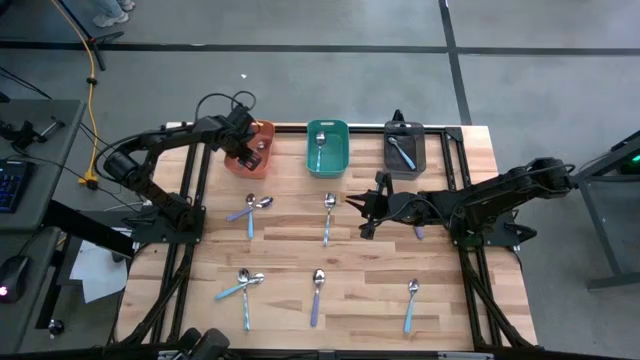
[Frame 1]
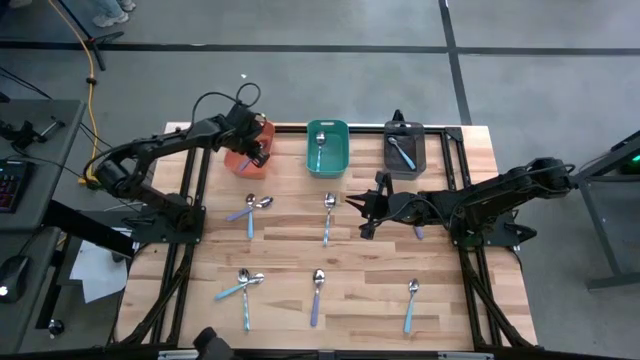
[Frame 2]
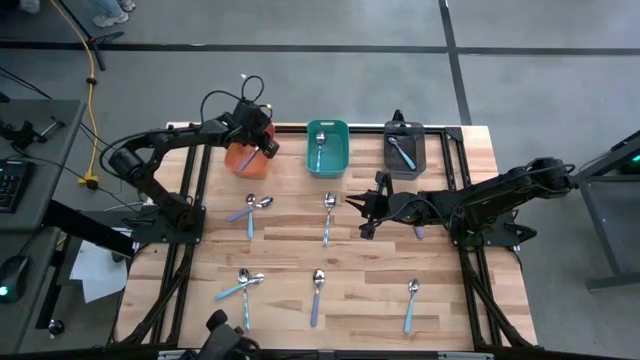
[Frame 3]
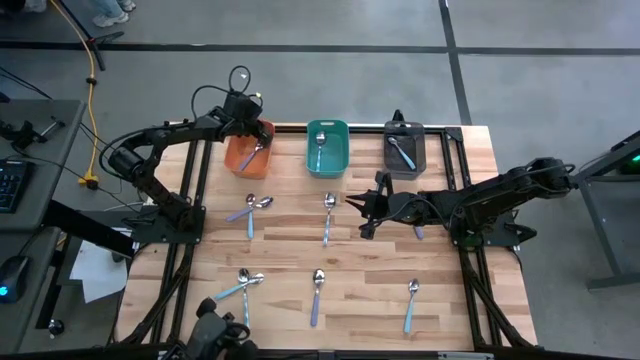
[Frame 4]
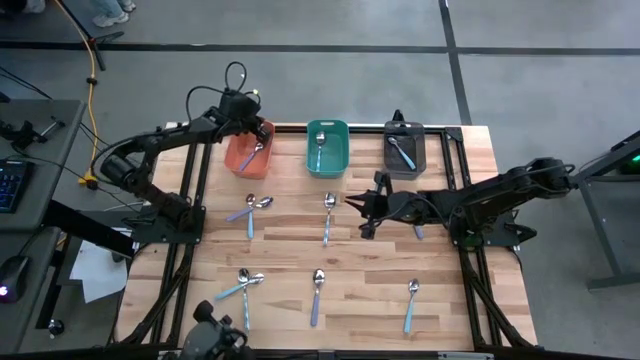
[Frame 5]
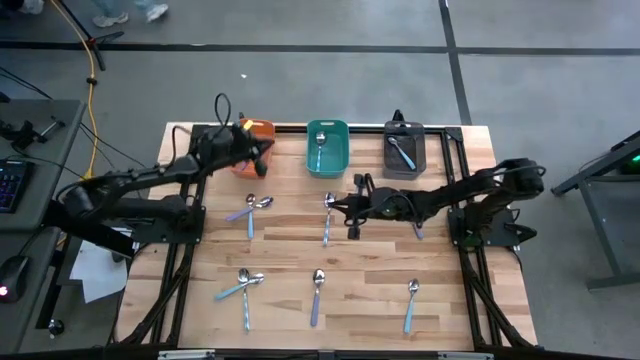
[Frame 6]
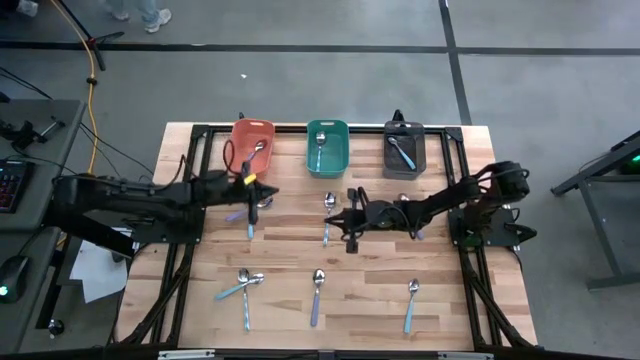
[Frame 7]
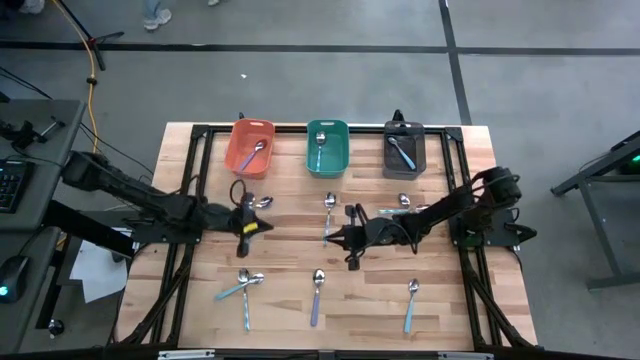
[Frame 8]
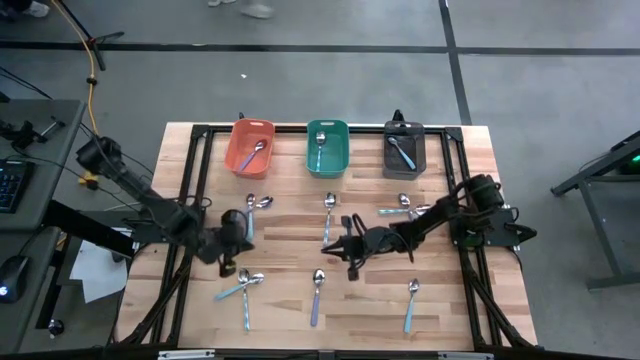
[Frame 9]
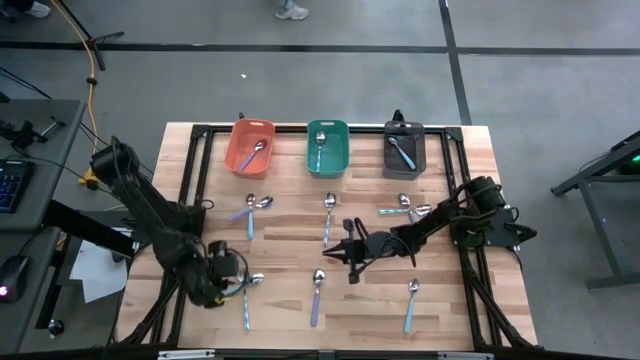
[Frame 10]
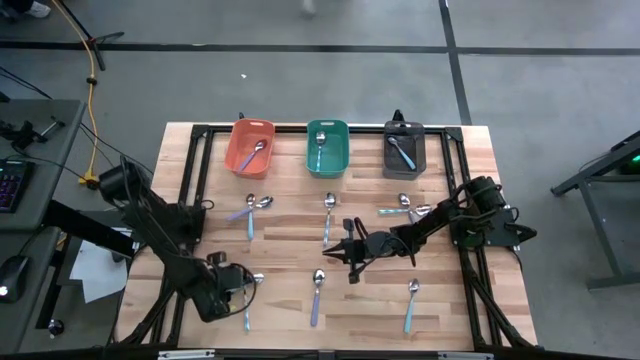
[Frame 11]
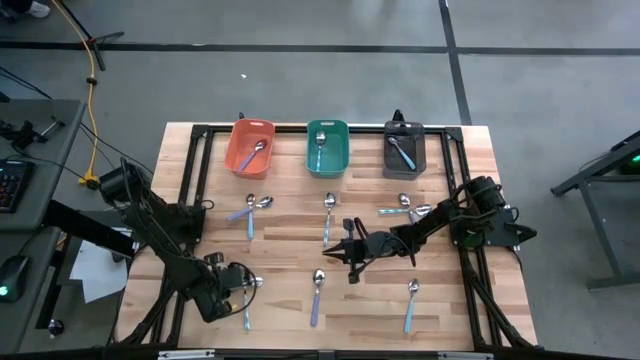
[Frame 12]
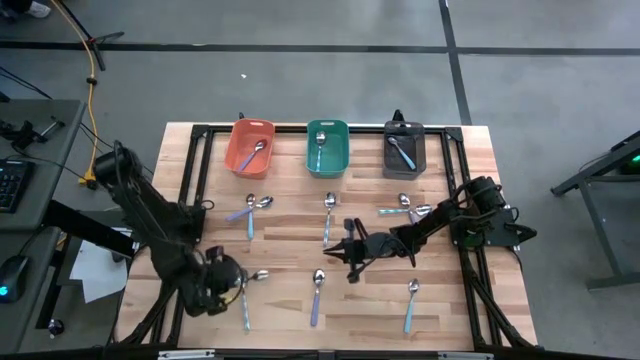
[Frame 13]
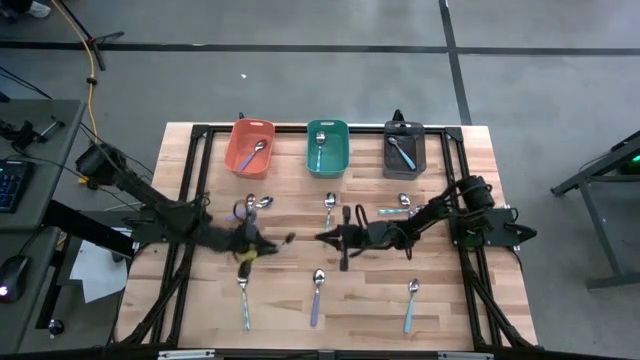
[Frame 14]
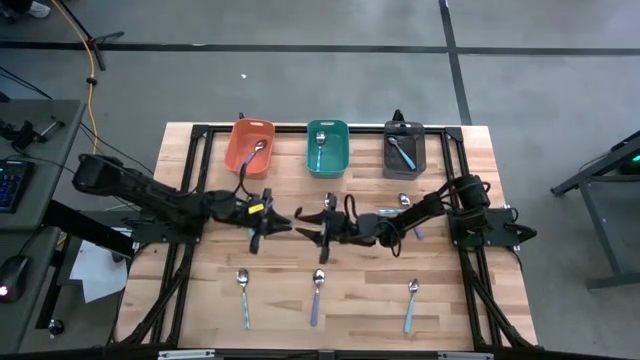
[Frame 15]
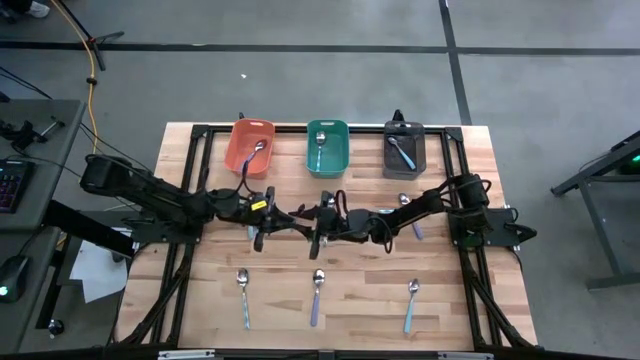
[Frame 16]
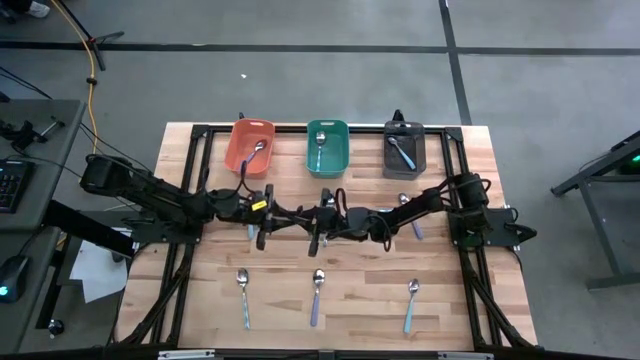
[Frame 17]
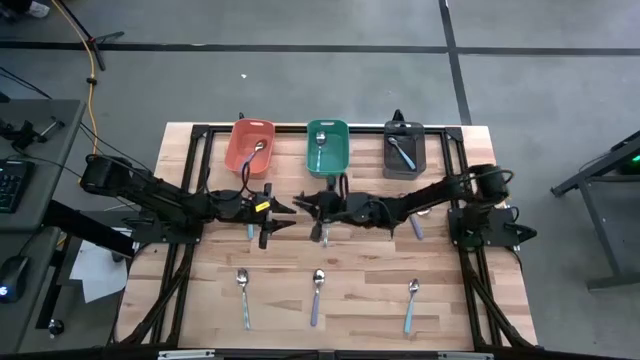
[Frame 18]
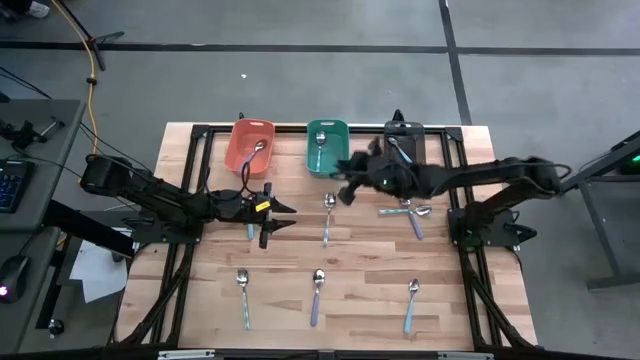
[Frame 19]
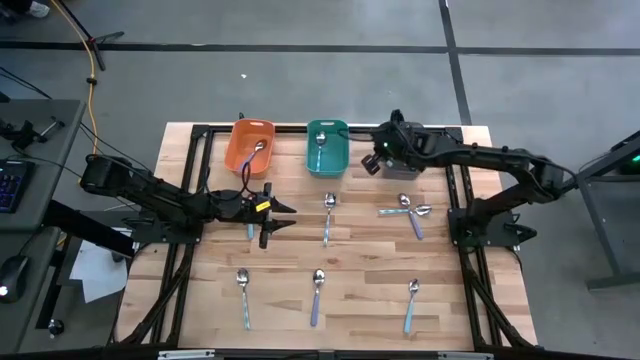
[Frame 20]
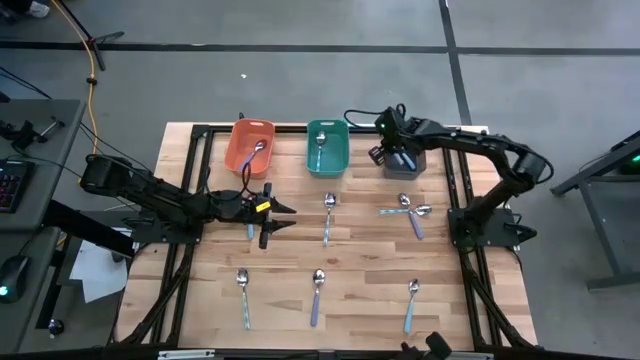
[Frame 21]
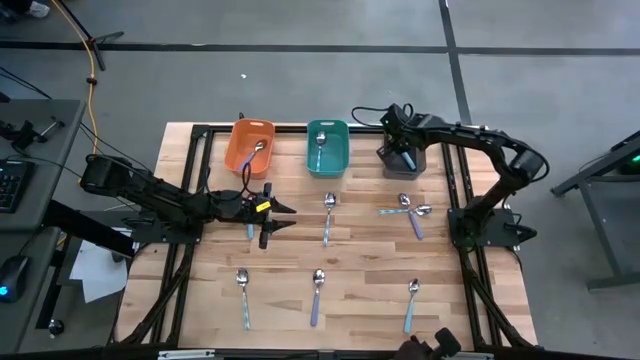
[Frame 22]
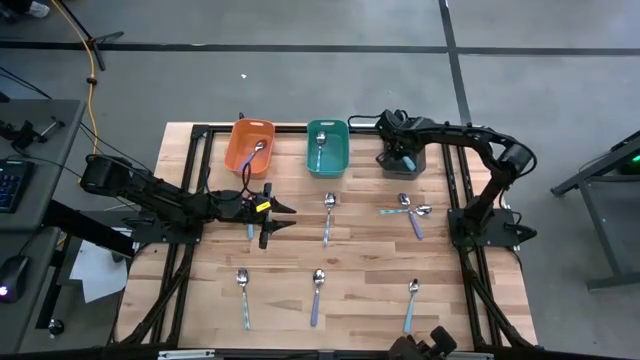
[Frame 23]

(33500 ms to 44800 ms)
Task: Sort silverware by color (type)
Put the blue spoon into the black bin

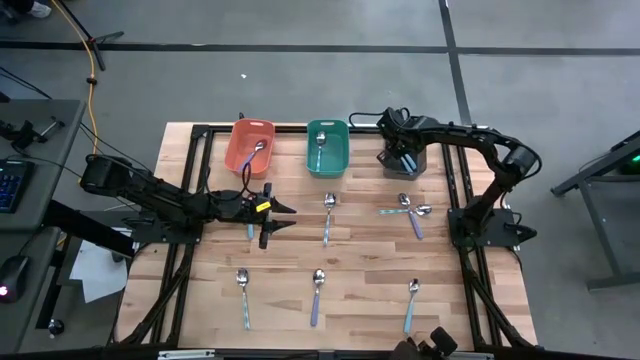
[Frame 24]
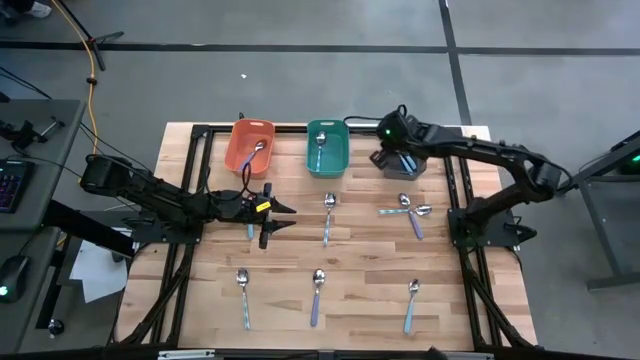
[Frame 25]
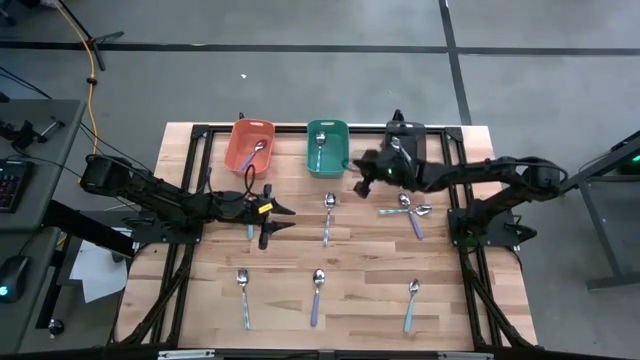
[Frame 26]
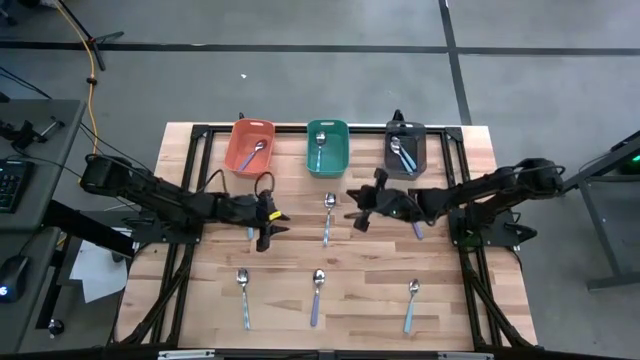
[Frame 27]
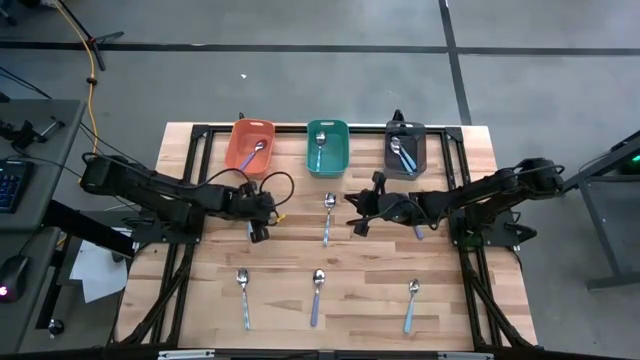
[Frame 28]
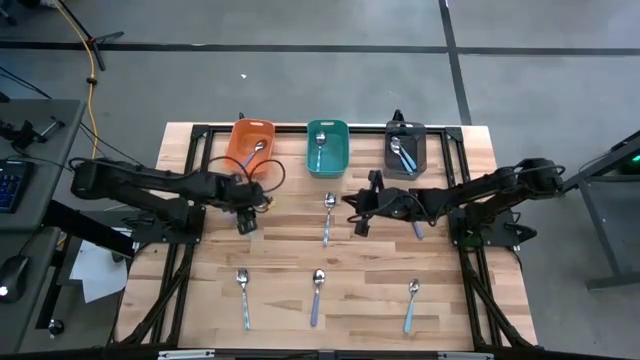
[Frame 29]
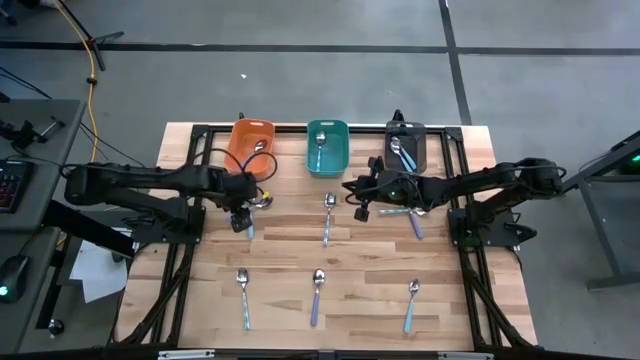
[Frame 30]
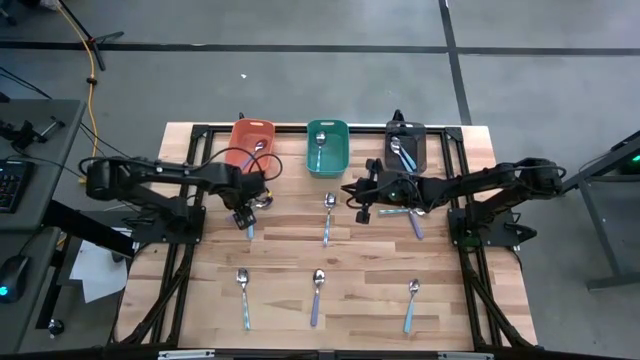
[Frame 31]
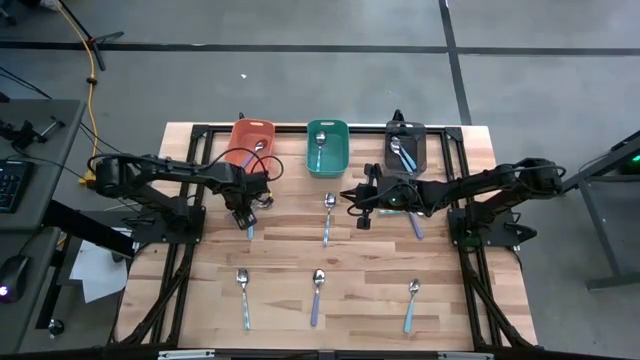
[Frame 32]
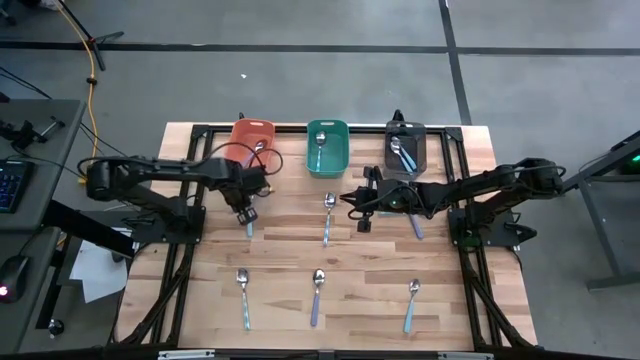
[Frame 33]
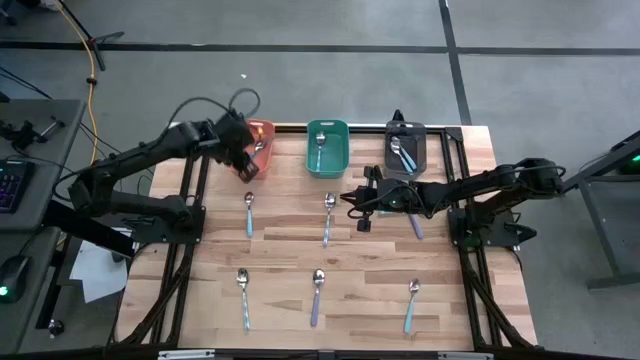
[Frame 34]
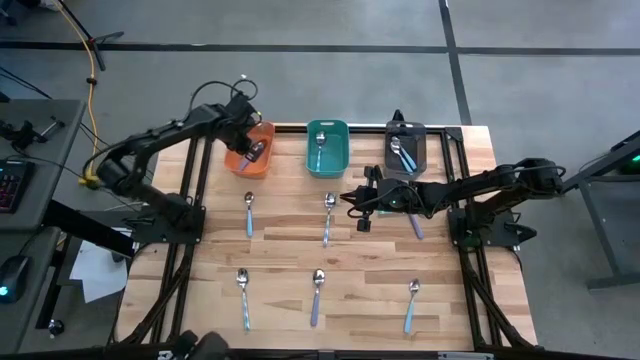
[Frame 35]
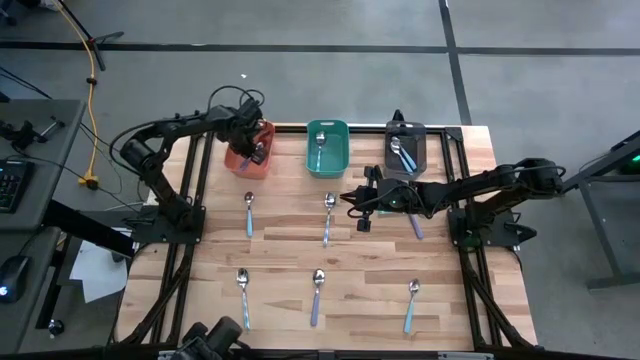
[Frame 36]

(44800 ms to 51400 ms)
Put the purple spoon into the orange bin

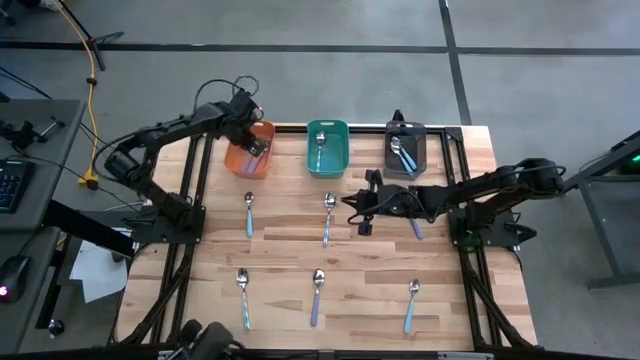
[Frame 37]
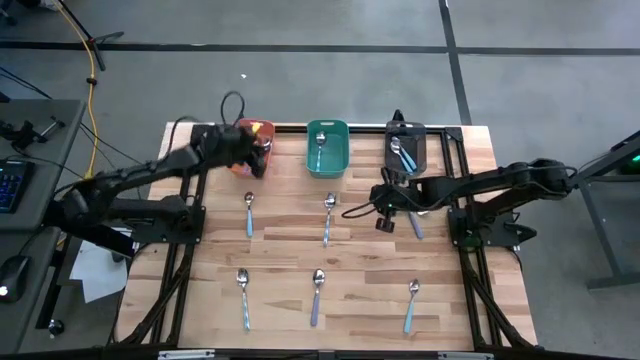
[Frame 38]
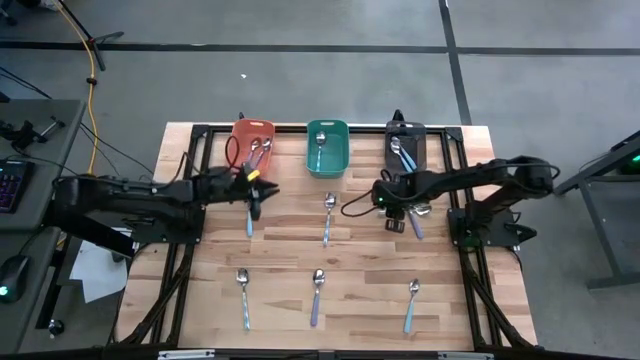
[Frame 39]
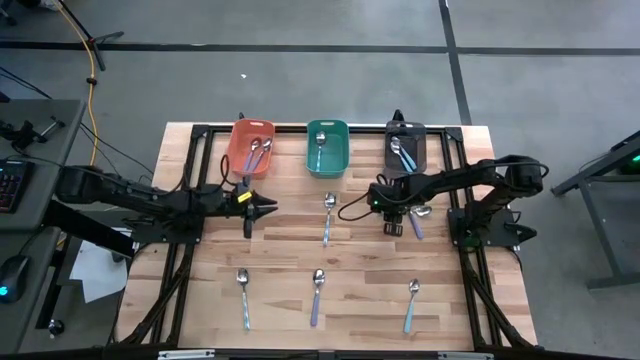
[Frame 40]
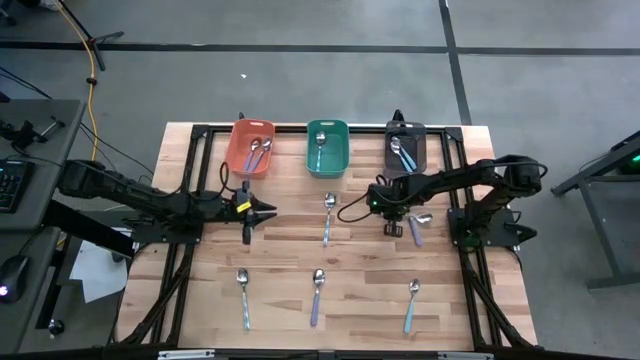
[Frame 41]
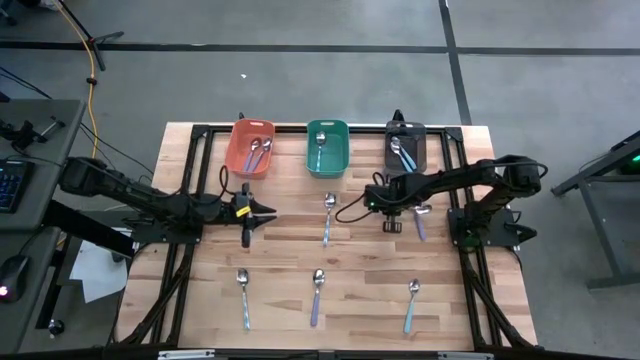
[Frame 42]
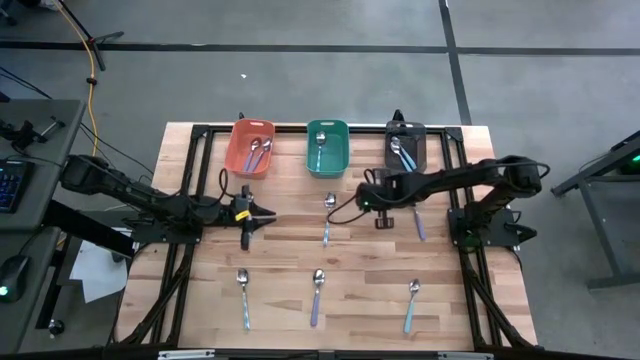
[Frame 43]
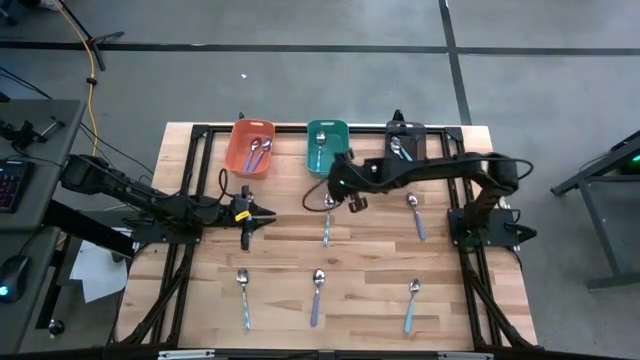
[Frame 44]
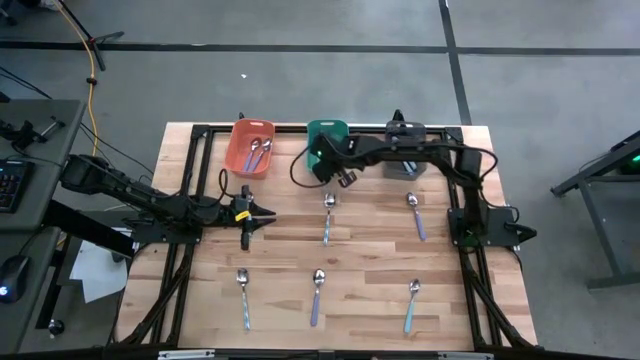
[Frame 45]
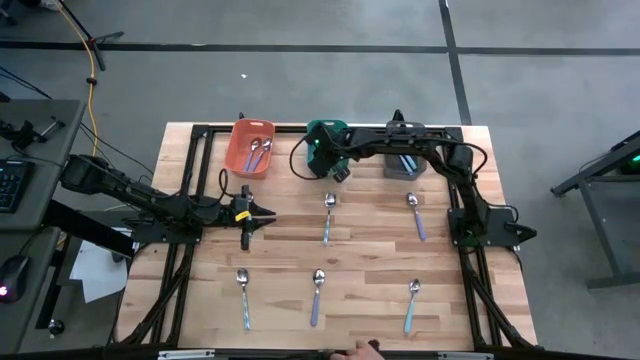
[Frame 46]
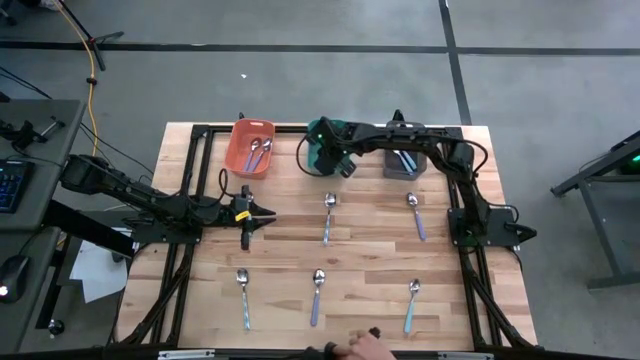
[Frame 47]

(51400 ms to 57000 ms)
Put the blue patterned spoon into the green bin
